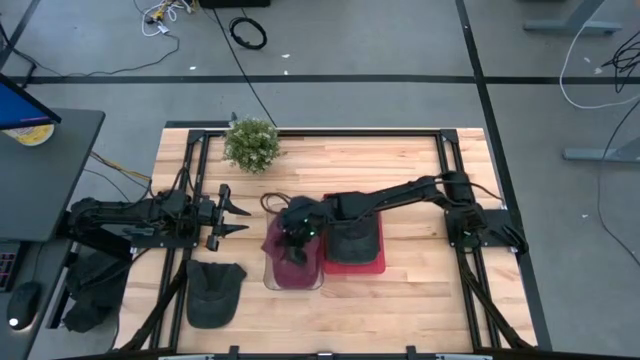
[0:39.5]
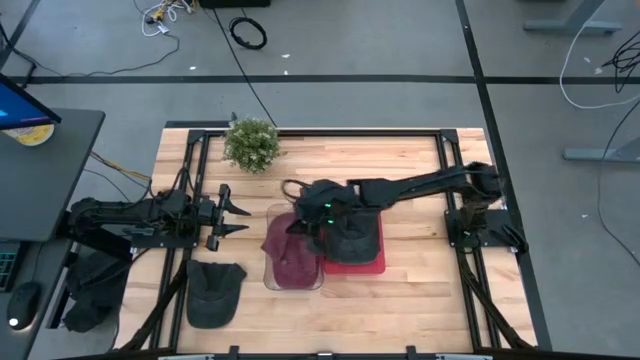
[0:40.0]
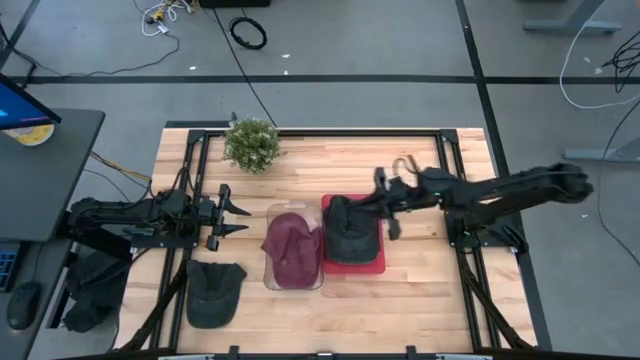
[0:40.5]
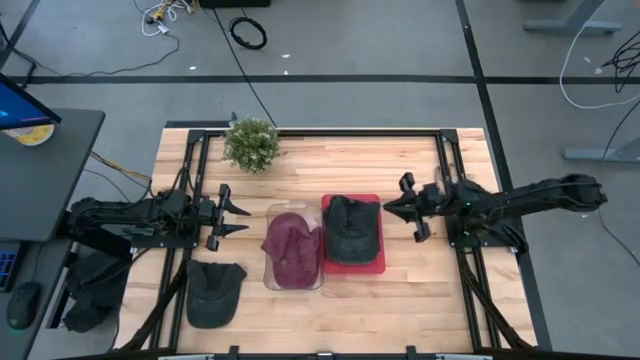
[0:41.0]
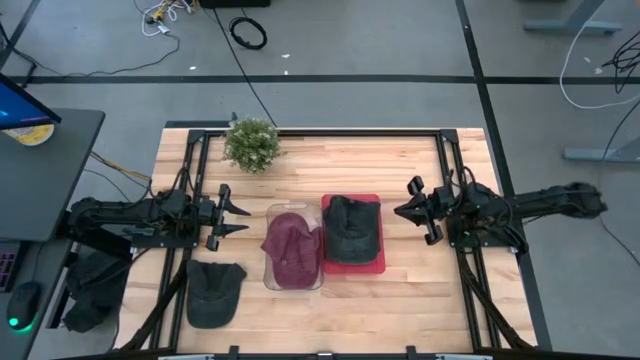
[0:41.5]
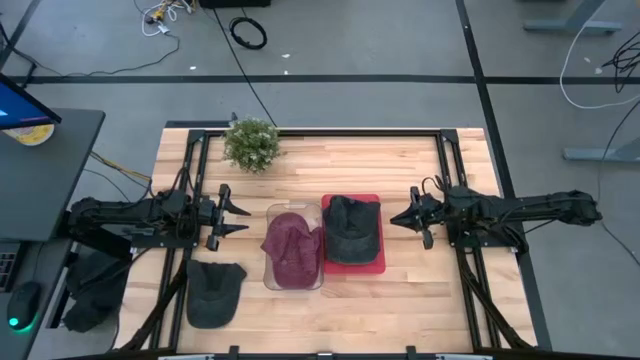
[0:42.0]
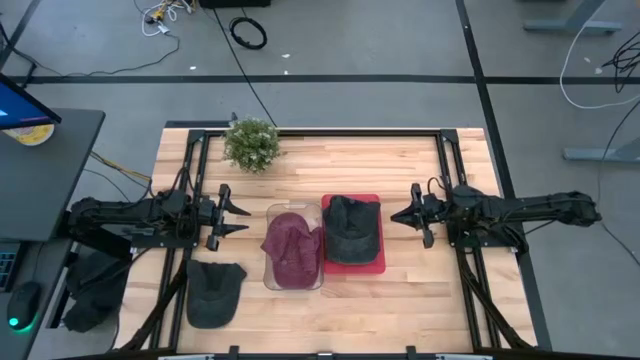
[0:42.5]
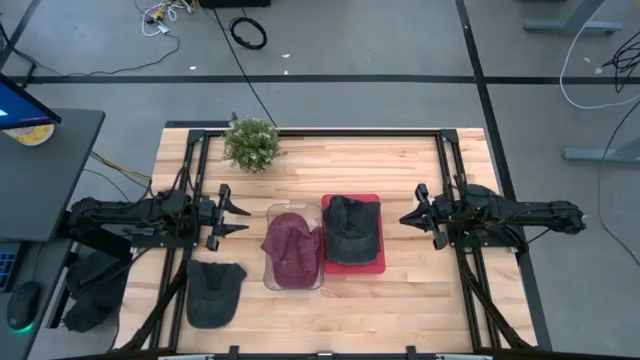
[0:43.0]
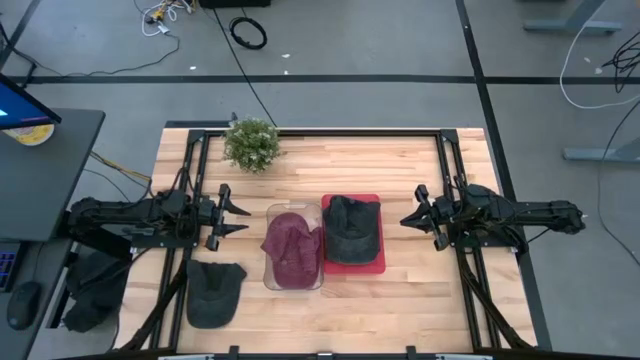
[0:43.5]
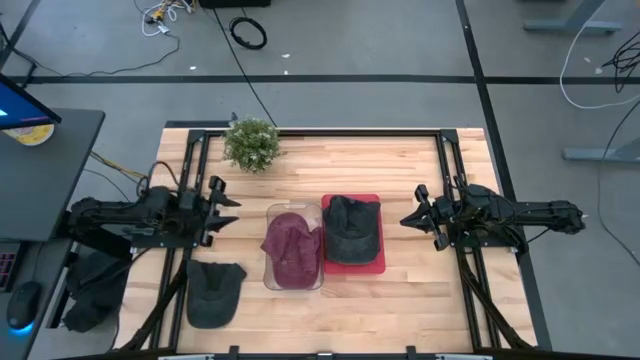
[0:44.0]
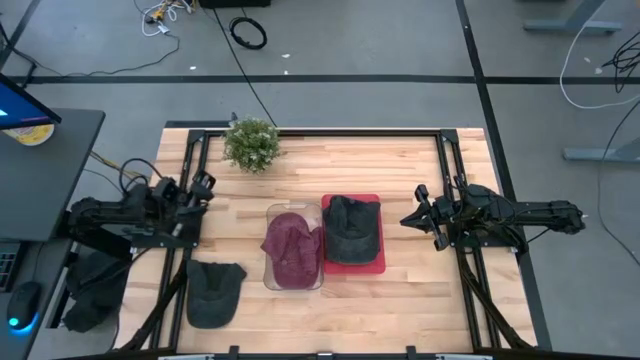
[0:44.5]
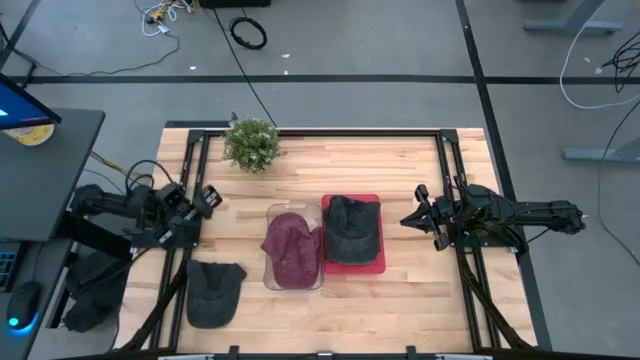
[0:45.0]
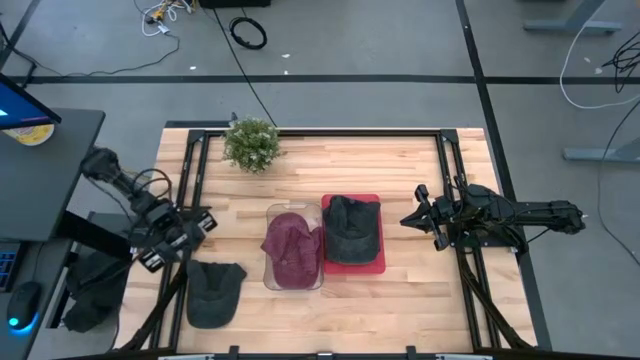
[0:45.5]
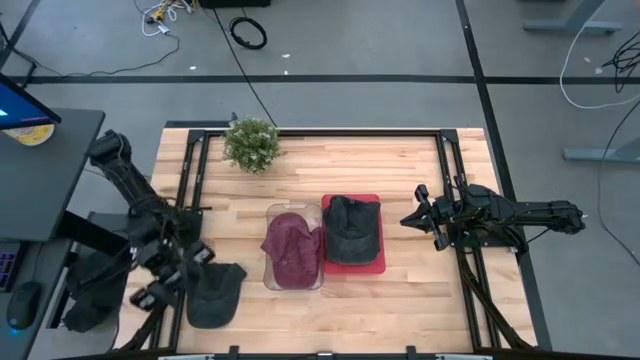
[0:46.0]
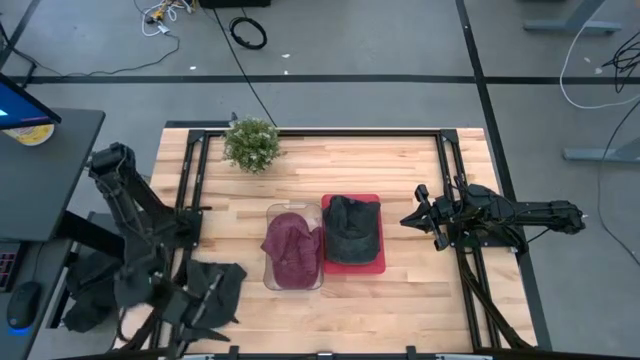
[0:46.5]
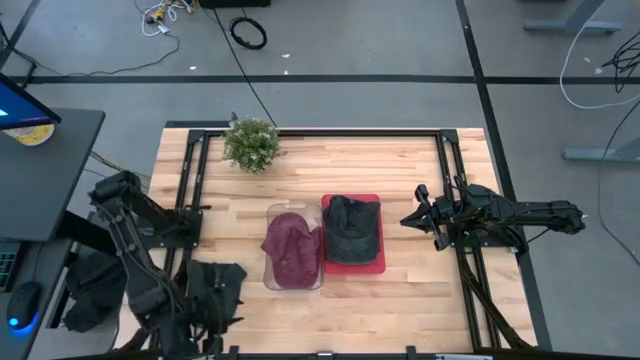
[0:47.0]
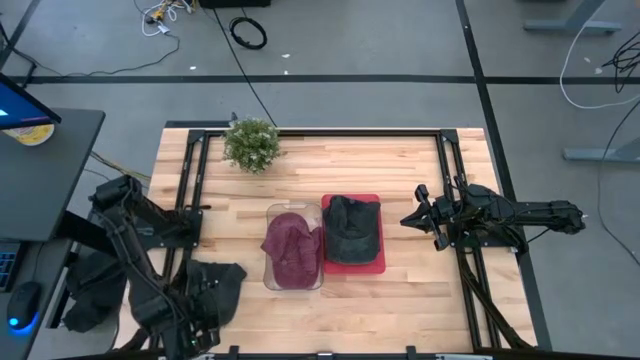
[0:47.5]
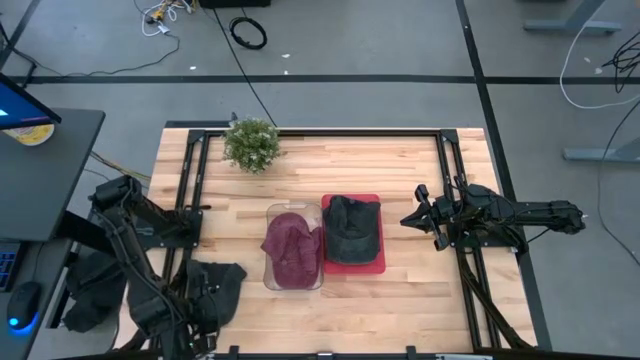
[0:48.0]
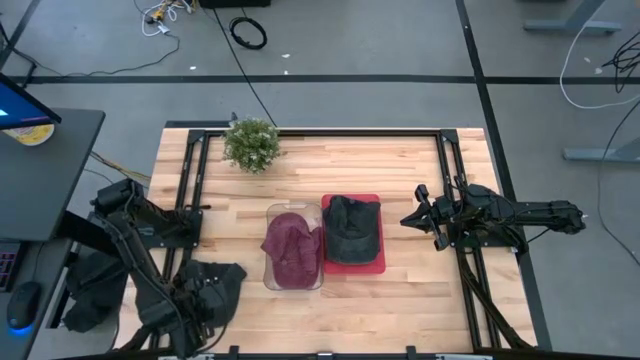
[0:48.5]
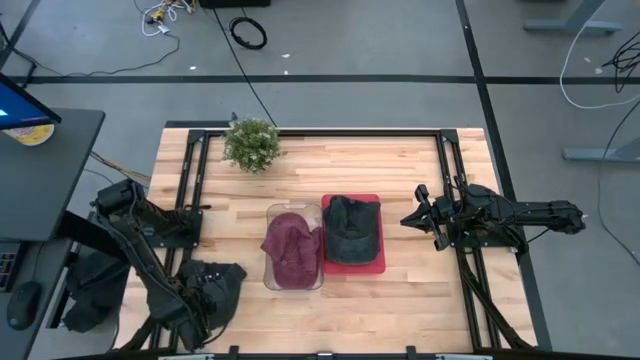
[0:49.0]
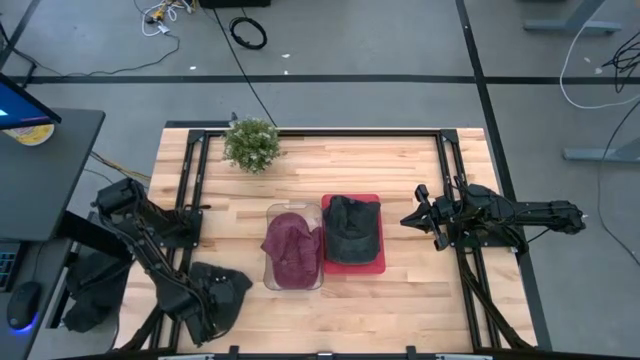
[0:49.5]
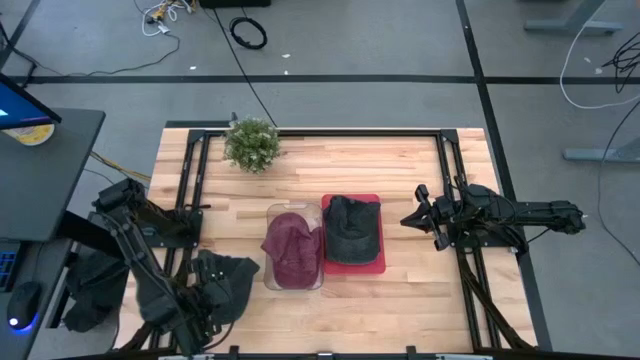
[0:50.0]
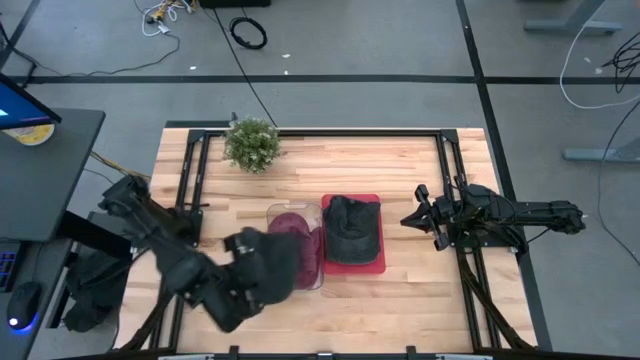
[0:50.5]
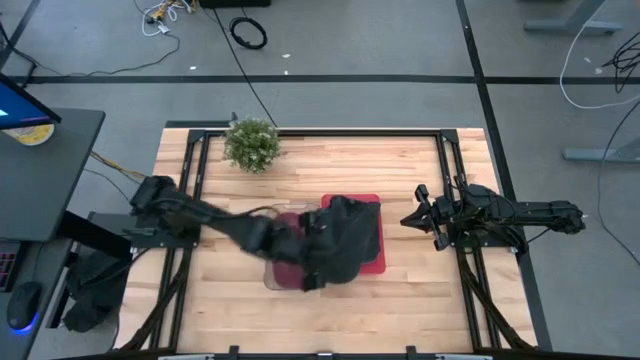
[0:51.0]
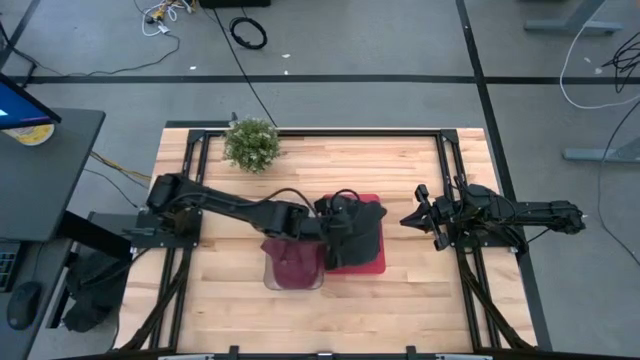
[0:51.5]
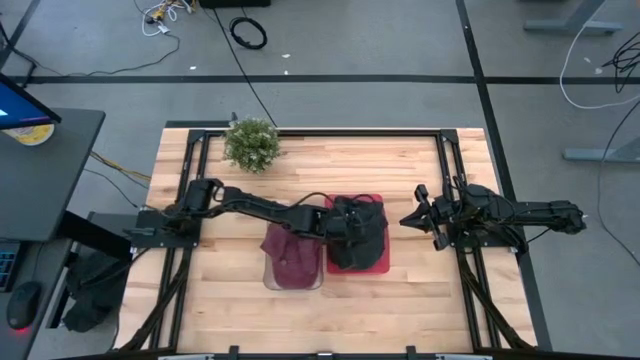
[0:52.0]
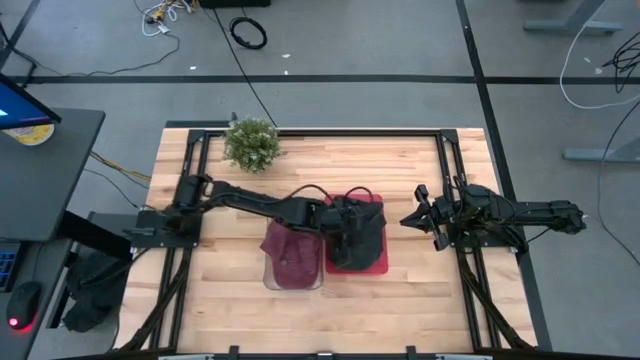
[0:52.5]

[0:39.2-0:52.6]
Task: Pick & Place hat
Put the black cap into the red bin

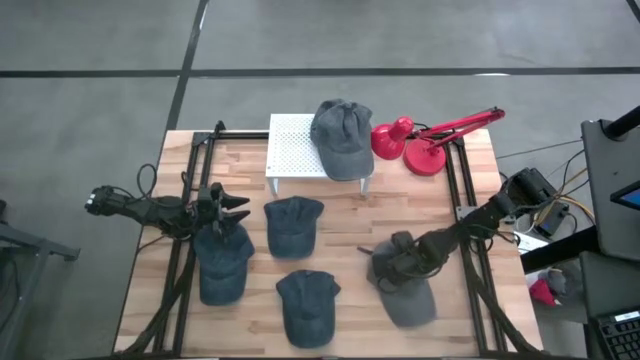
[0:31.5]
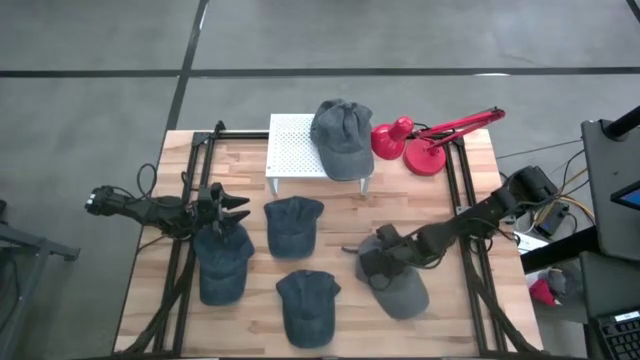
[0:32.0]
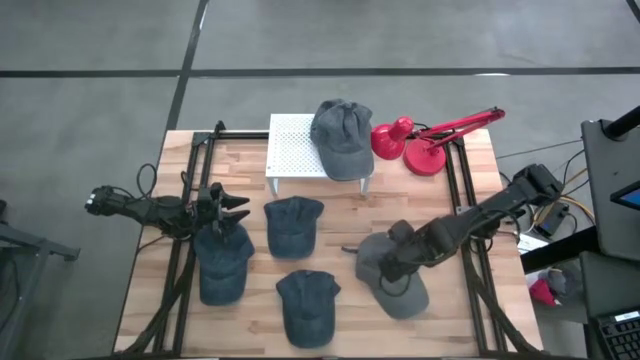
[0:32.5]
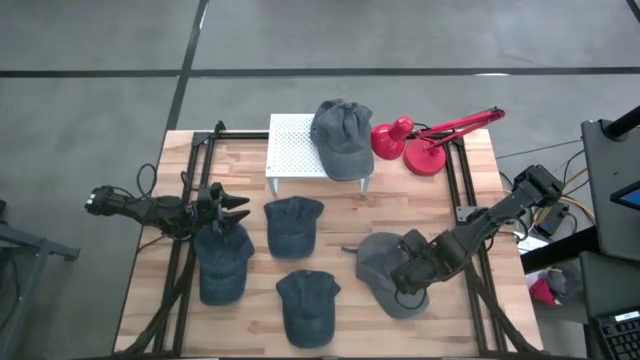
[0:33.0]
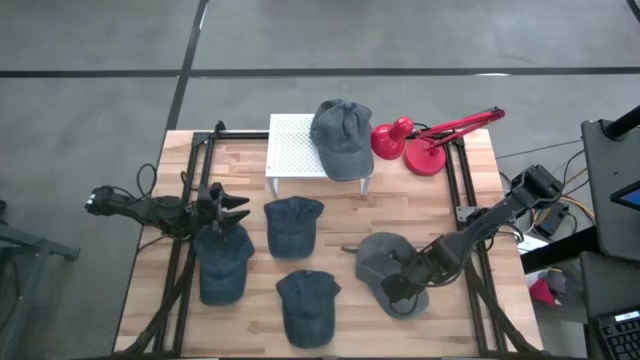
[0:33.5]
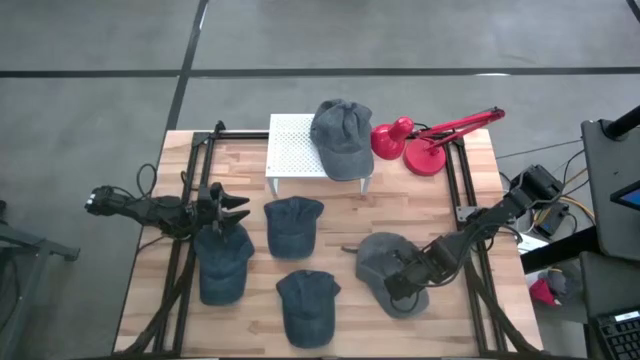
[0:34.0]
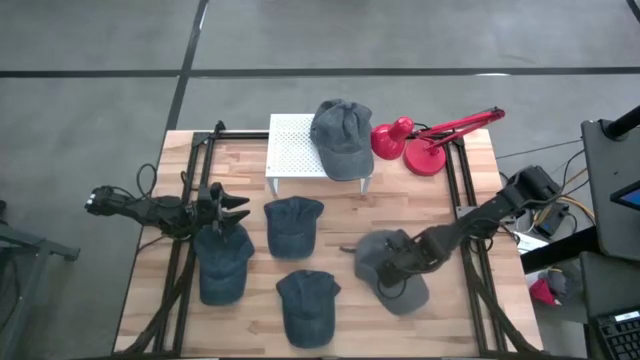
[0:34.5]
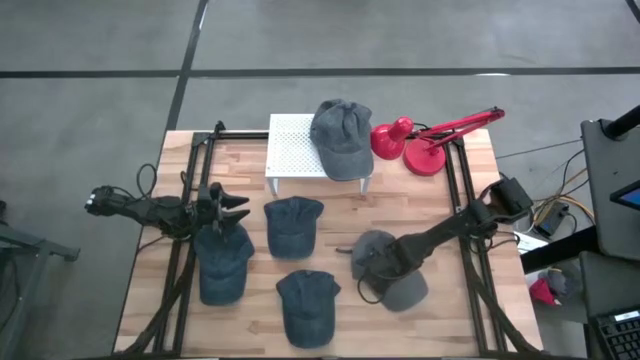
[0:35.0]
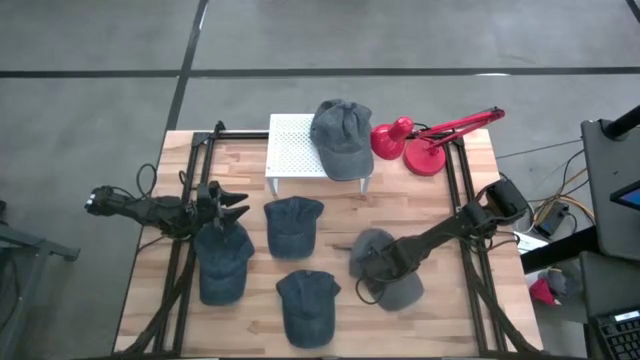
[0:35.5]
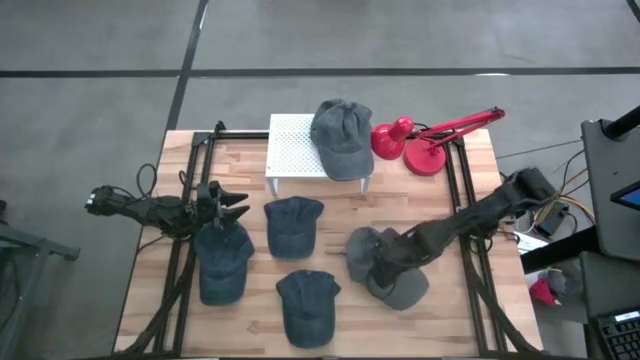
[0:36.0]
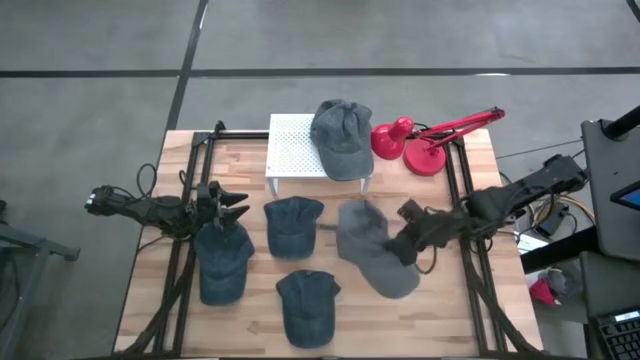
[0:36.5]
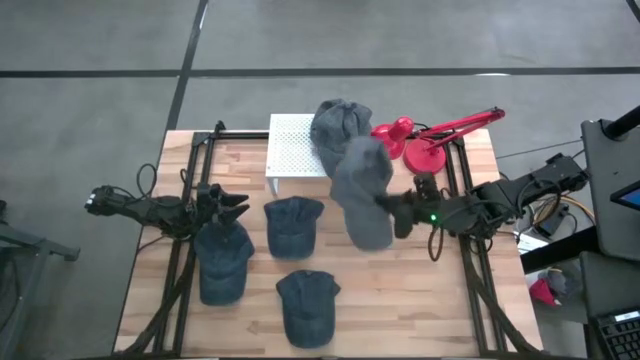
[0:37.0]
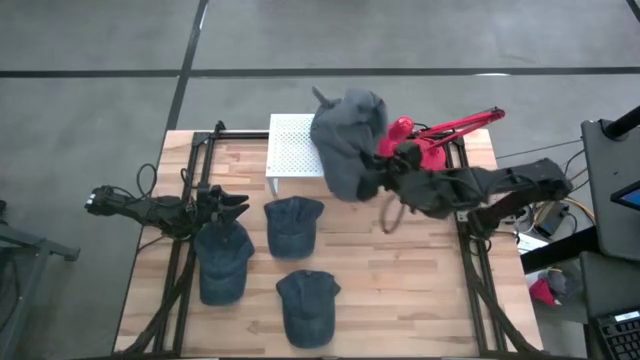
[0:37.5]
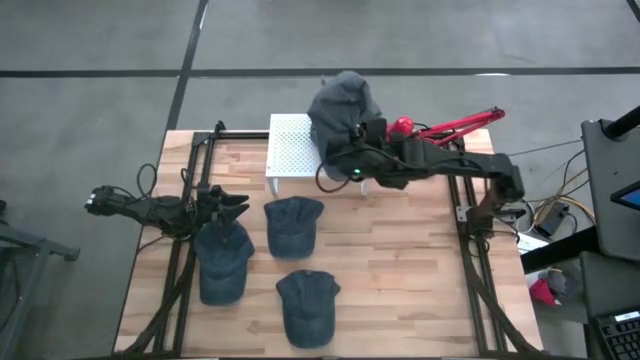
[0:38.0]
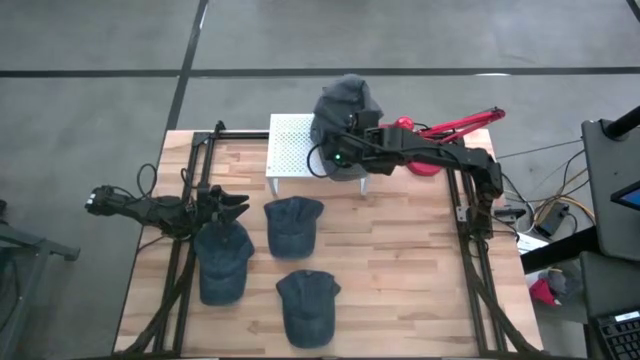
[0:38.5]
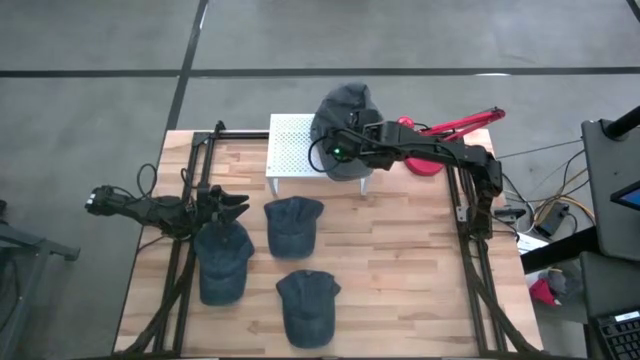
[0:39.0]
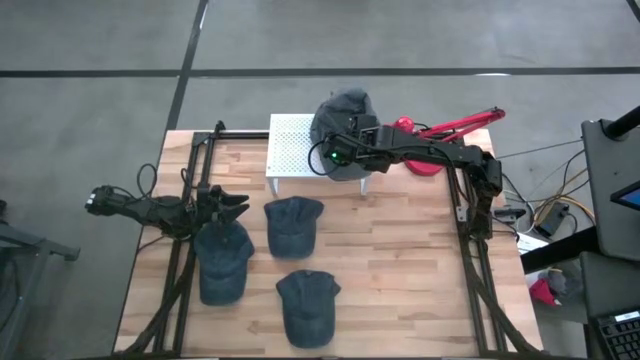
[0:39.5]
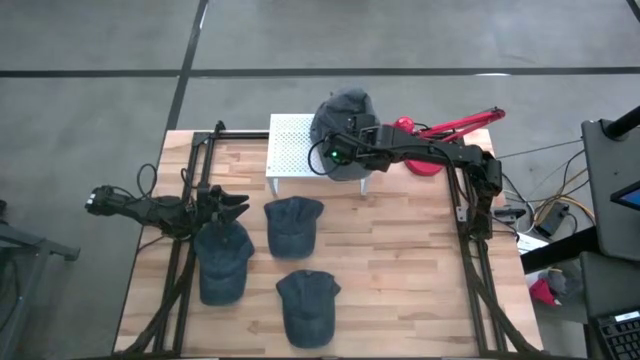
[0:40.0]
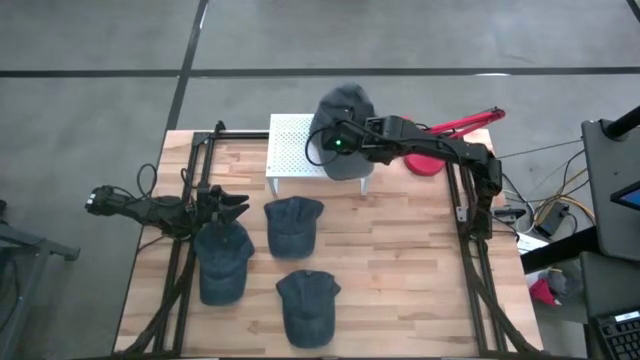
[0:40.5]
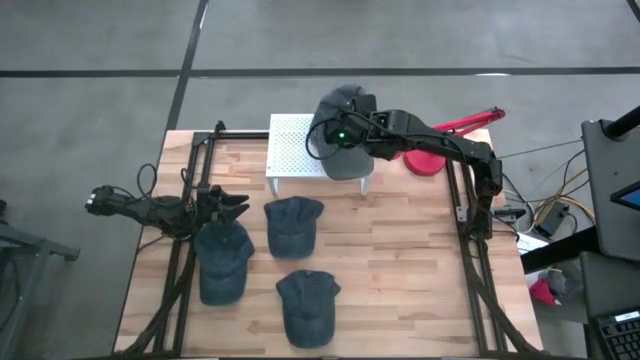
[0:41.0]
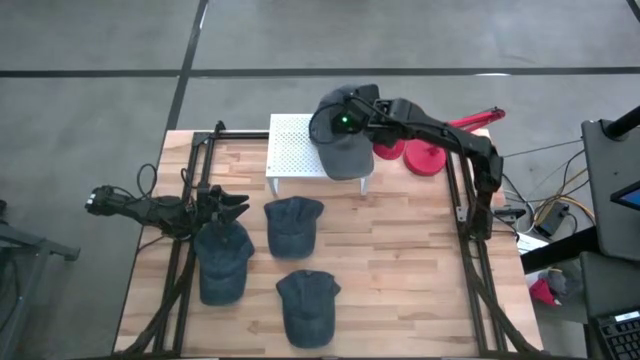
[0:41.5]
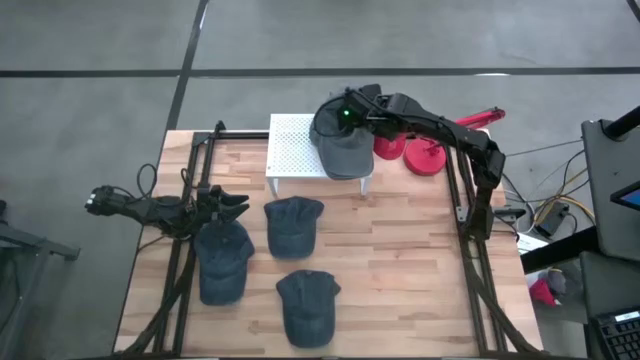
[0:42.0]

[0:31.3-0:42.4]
Task: Pick & Place hat
Stack the gray cap on the gray caps on the shelf
